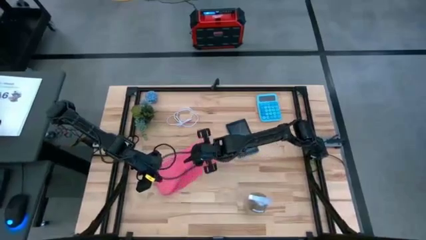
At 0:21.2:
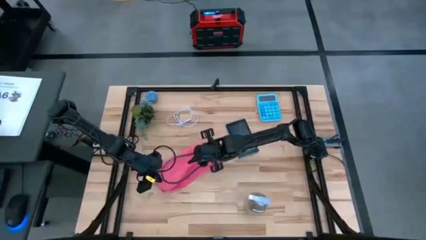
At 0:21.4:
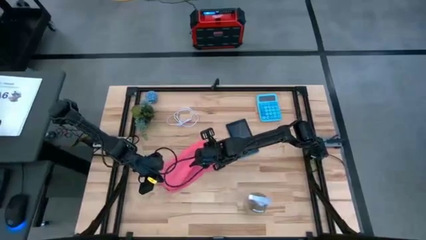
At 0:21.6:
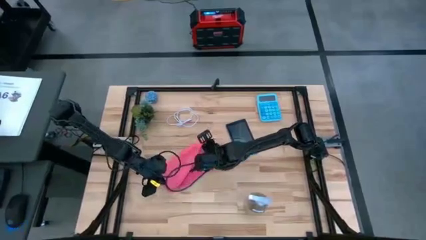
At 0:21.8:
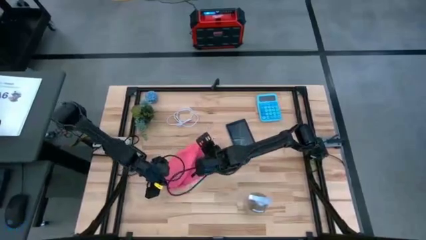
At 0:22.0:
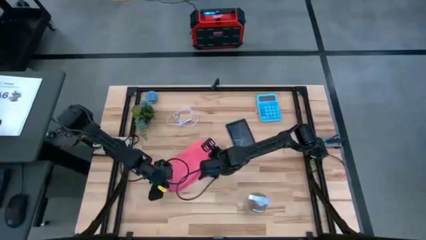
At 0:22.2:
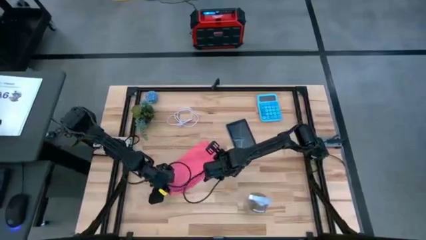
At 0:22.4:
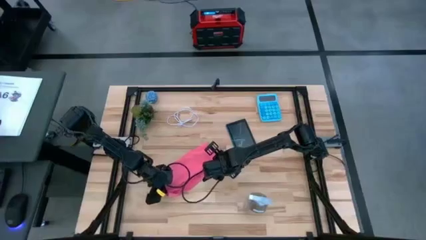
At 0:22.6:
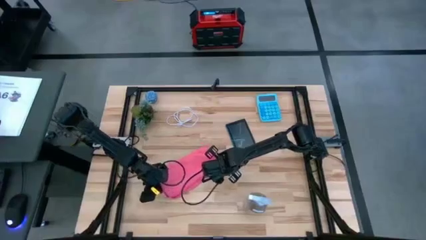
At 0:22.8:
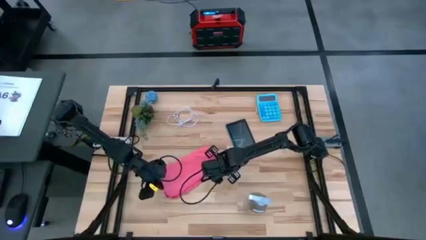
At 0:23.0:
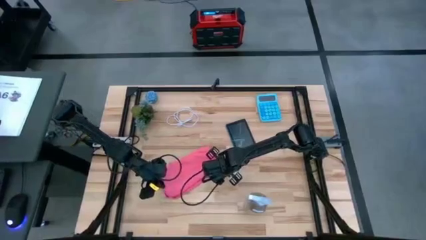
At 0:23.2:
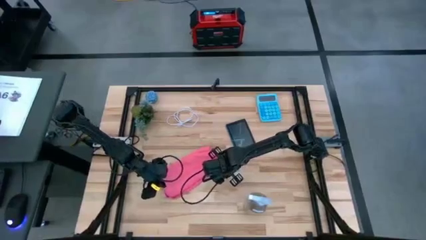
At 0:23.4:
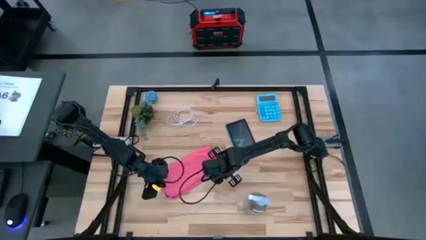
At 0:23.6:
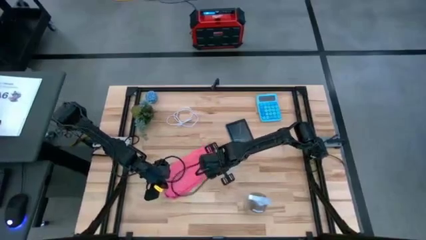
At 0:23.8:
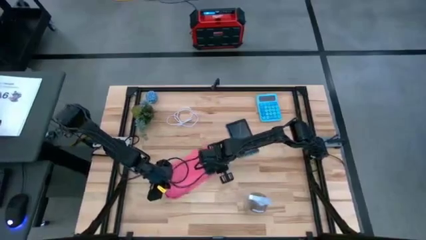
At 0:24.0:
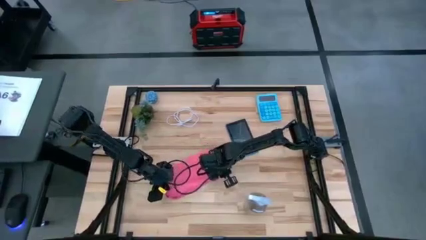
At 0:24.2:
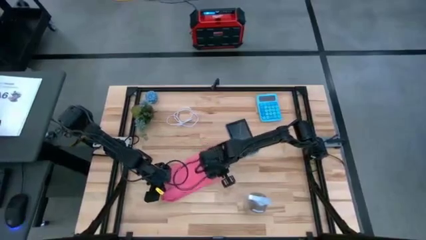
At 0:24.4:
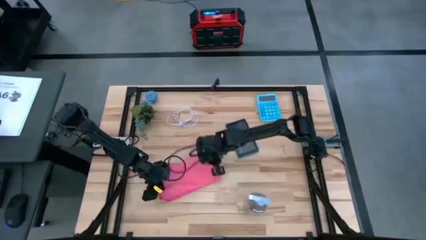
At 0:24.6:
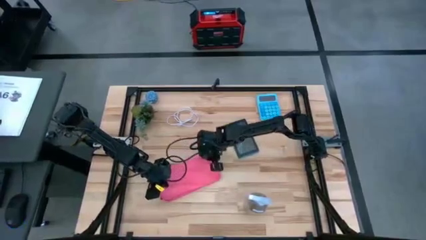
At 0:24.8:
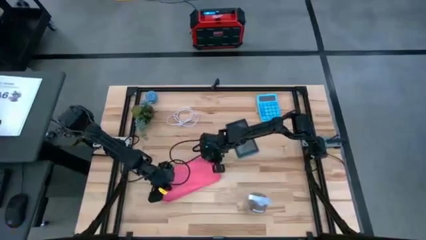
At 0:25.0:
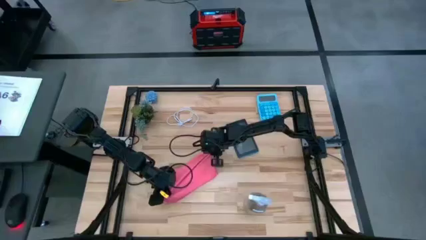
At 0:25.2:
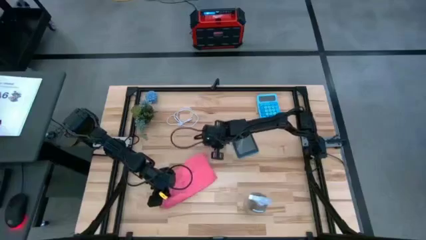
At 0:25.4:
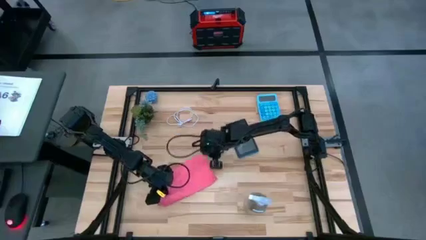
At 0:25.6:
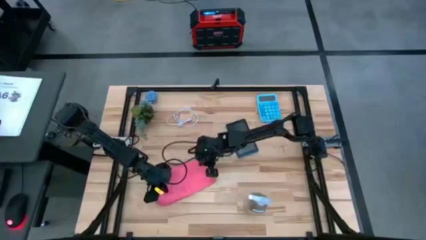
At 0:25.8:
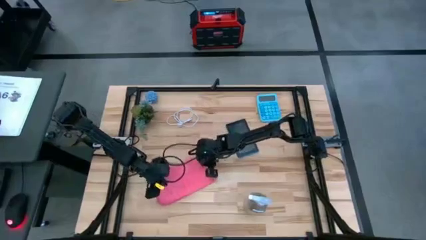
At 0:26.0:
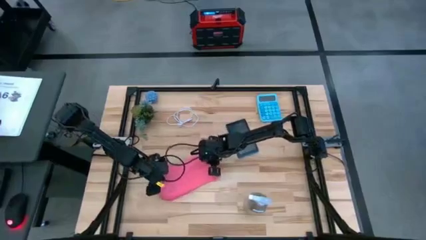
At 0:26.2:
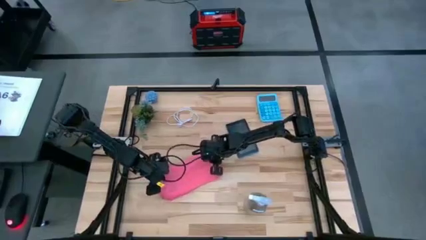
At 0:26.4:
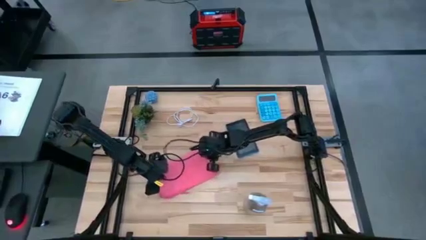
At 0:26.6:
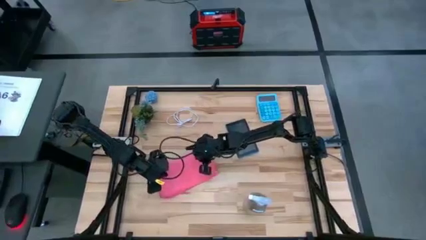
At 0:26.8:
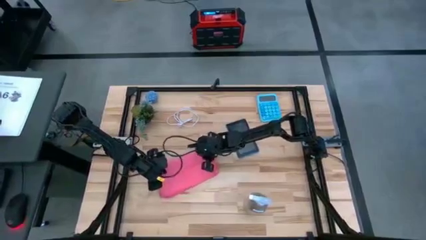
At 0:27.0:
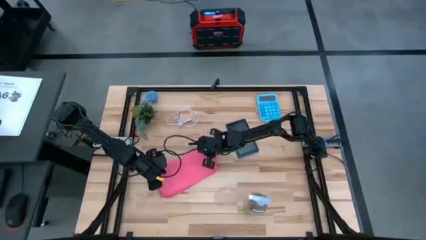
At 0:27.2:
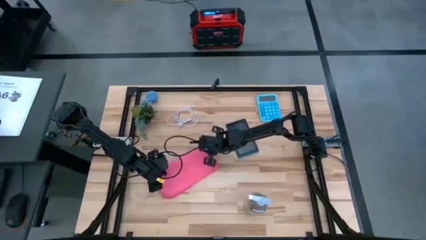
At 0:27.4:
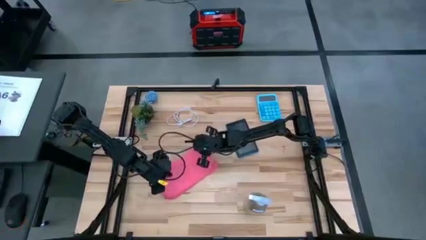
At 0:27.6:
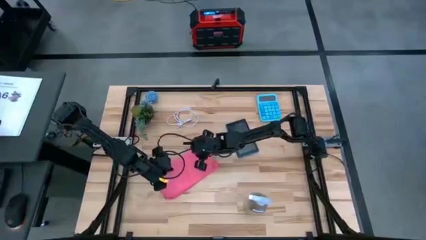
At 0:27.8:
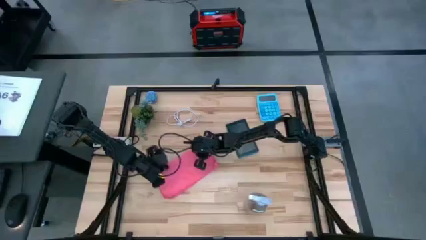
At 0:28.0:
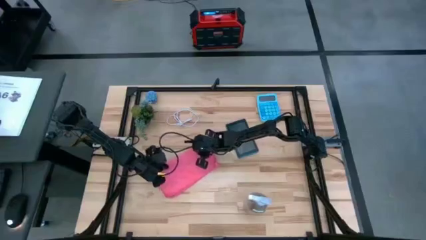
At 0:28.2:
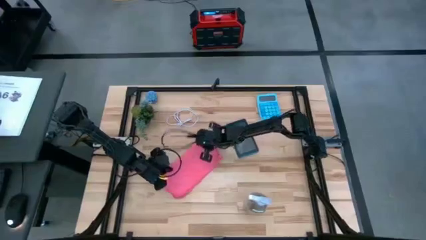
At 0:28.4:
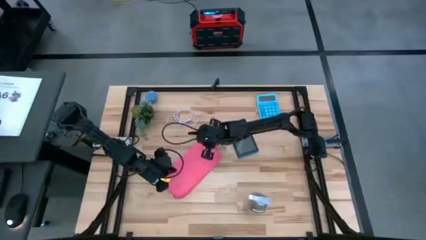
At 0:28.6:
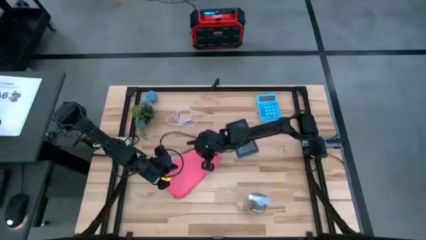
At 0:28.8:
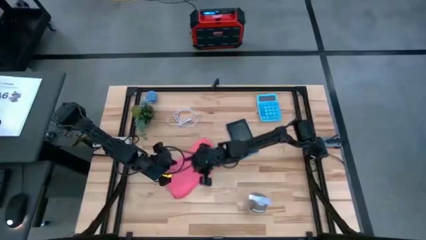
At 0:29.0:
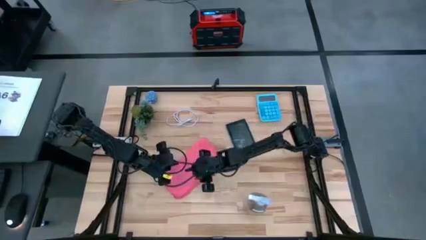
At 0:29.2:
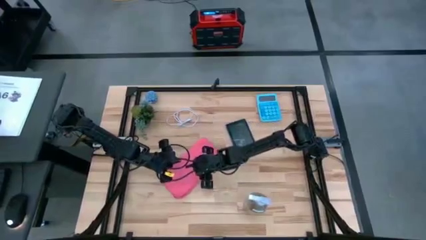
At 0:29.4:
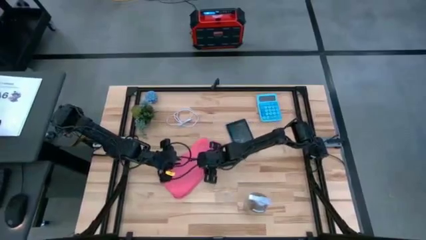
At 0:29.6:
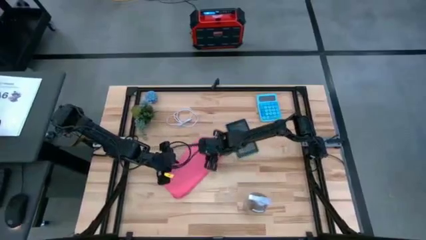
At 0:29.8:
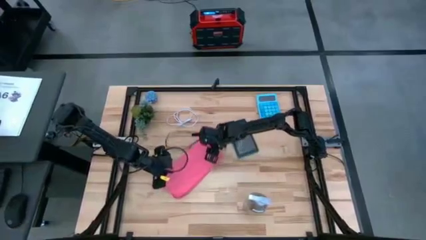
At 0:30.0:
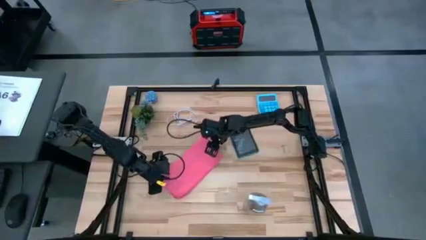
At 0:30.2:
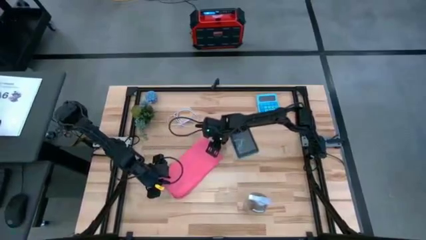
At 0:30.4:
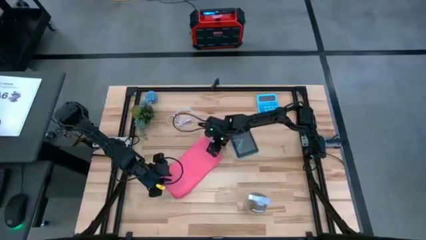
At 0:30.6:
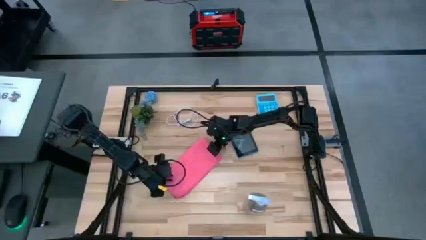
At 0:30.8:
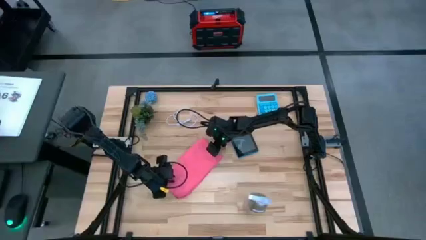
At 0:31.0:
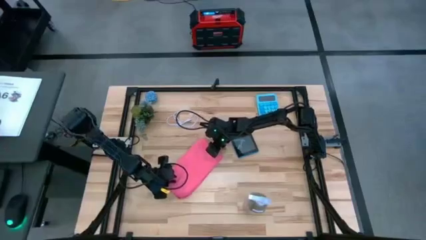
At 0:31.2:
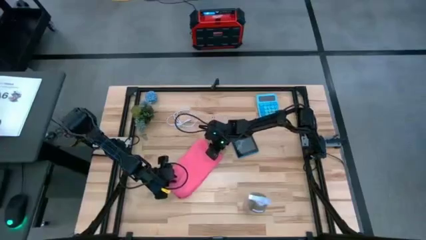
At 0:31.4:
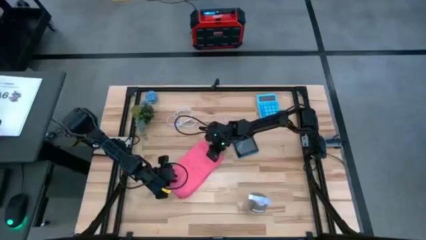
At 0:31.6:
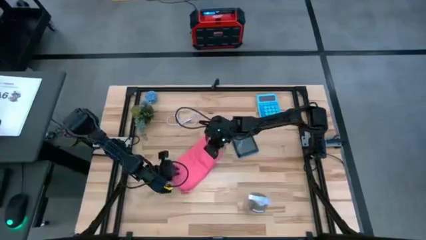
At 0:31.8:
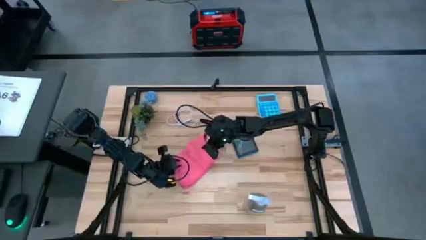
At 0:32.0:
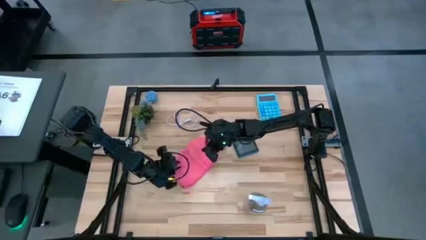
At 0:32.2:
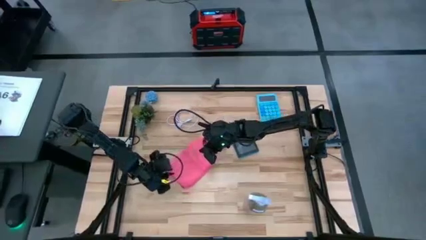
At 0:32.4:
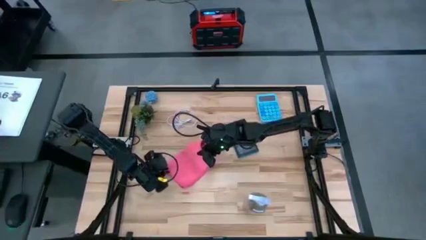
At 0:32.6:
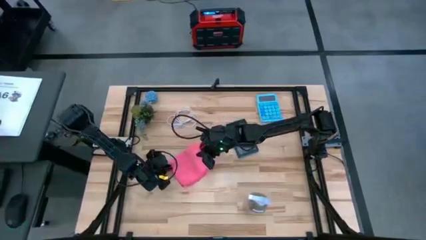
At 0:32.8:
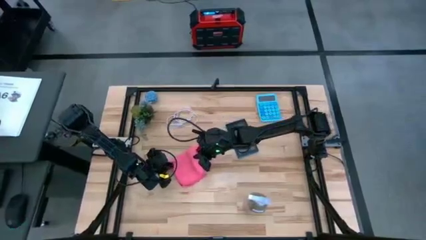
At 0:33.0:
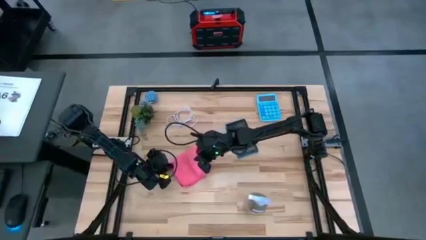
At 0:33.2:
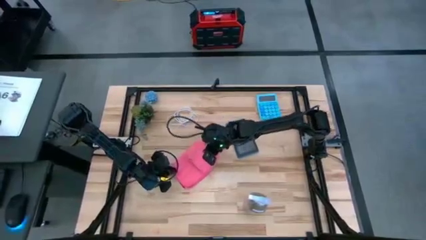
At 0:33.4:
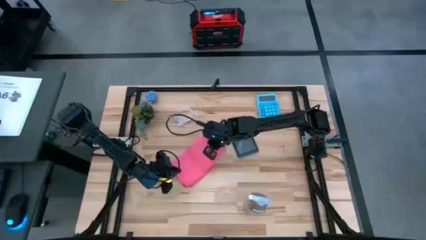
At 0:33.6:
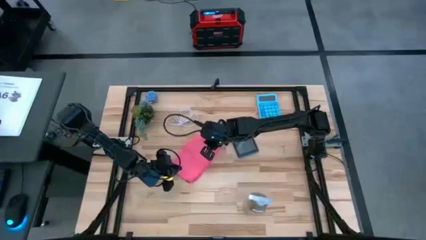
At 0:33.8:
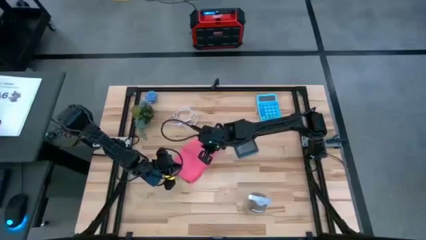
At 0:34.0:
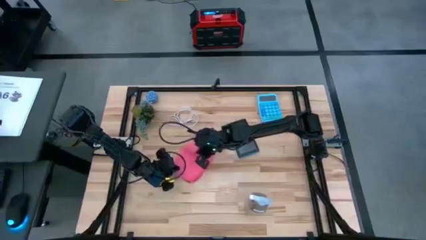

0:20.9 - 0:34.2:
Task: Apply microfiber cloth
Fold the pink microfiber cloth
